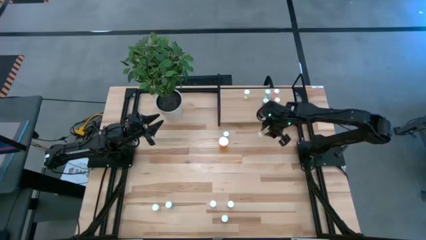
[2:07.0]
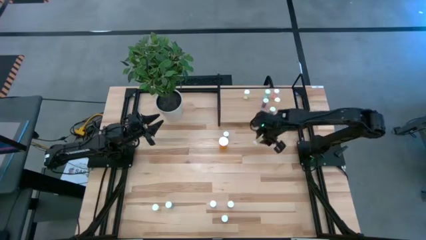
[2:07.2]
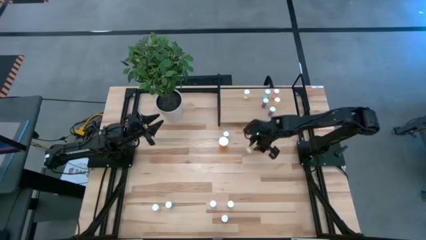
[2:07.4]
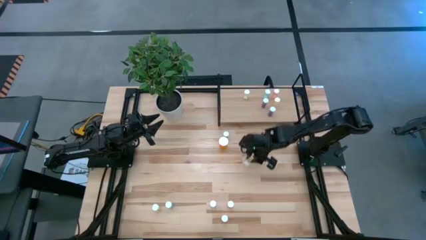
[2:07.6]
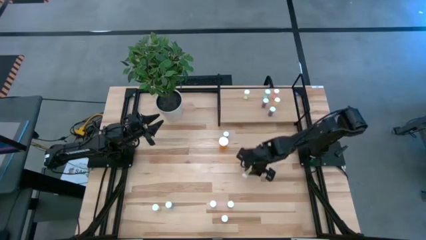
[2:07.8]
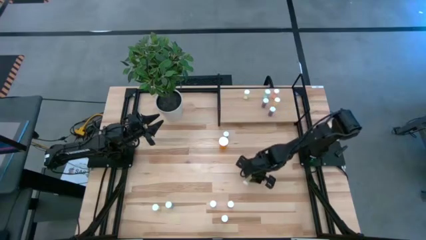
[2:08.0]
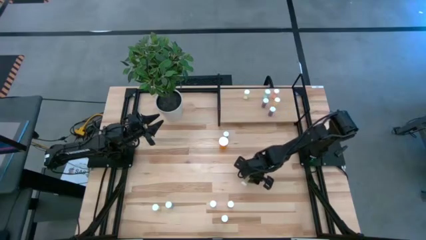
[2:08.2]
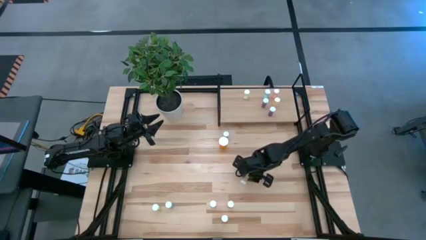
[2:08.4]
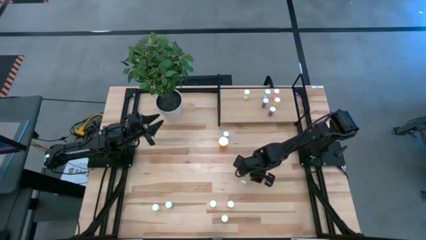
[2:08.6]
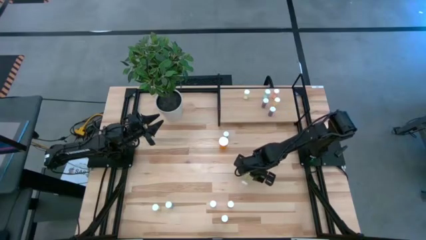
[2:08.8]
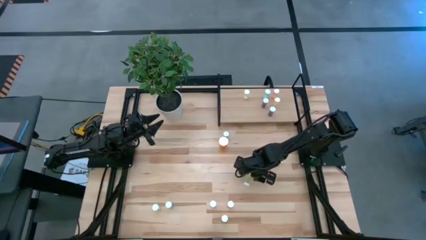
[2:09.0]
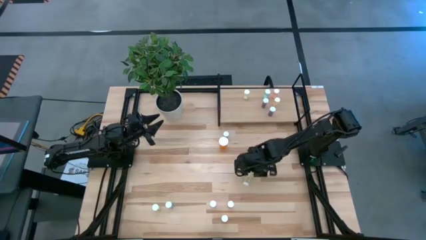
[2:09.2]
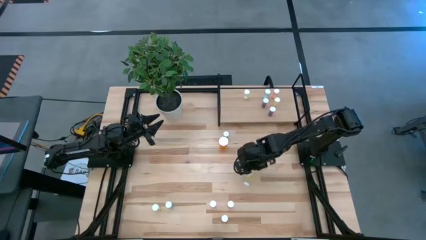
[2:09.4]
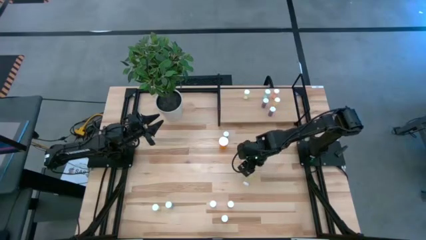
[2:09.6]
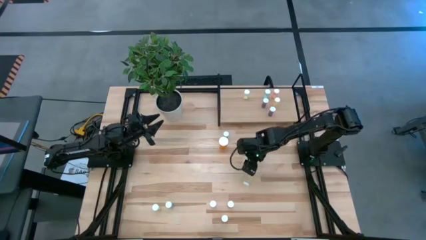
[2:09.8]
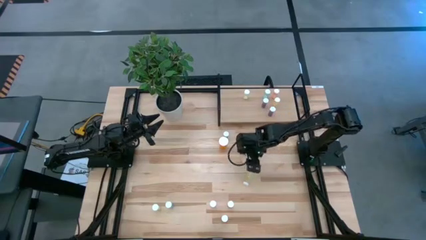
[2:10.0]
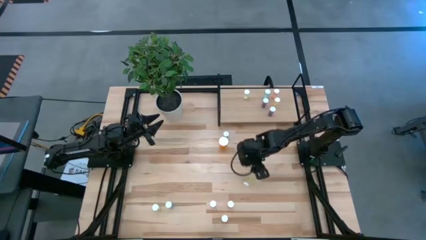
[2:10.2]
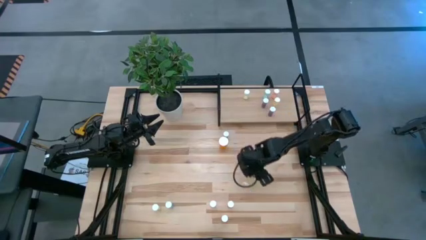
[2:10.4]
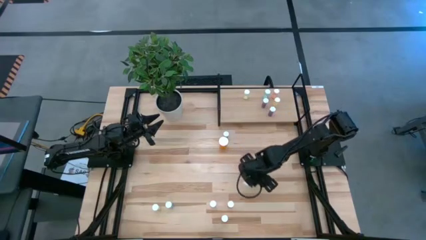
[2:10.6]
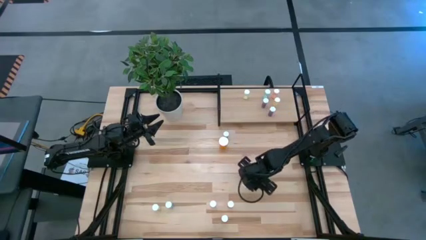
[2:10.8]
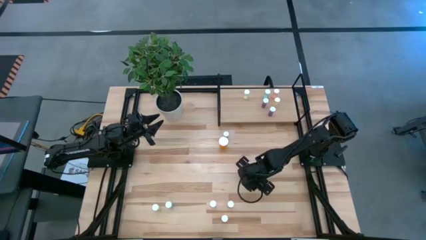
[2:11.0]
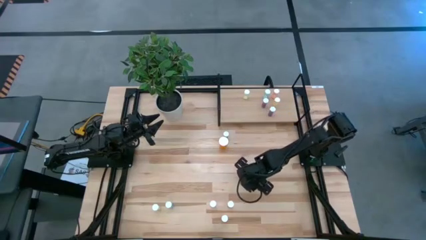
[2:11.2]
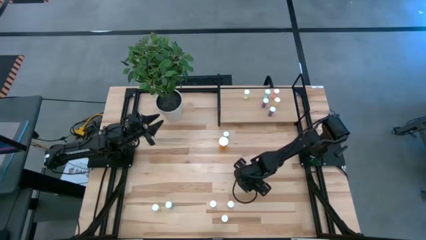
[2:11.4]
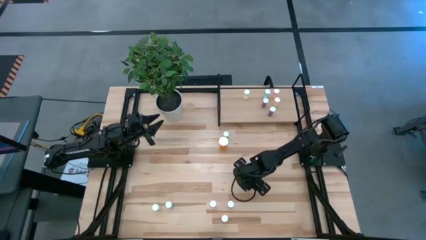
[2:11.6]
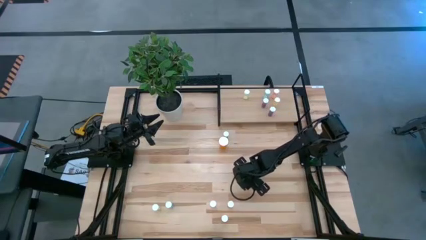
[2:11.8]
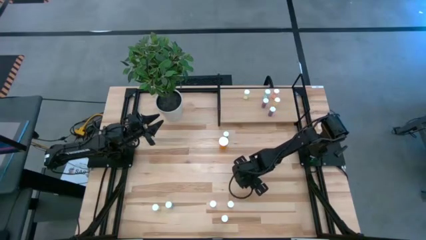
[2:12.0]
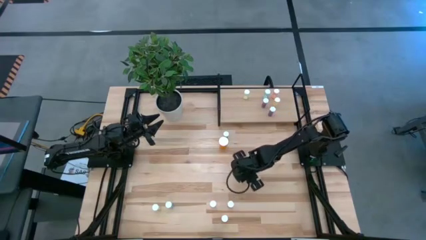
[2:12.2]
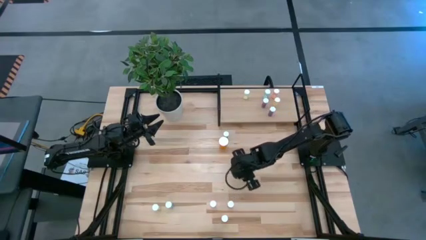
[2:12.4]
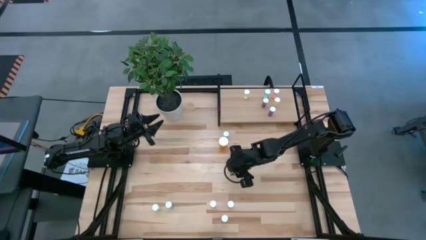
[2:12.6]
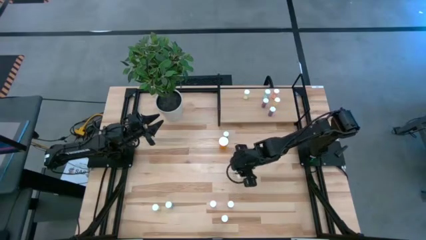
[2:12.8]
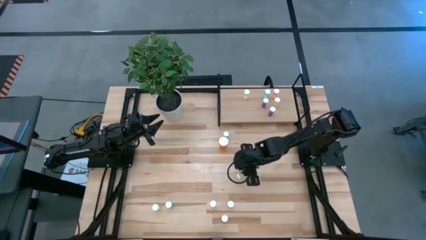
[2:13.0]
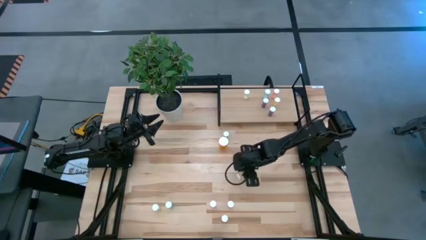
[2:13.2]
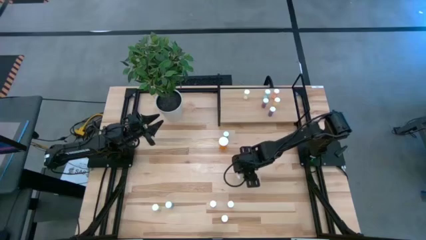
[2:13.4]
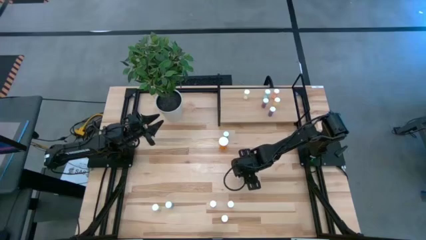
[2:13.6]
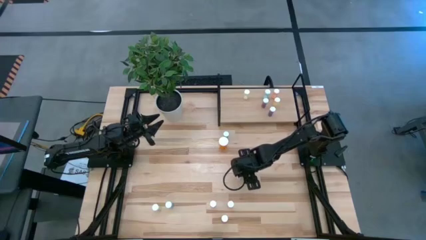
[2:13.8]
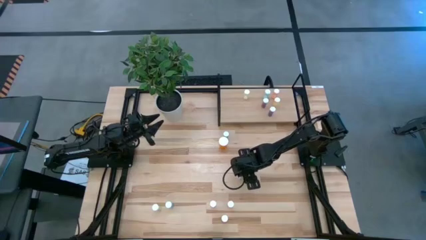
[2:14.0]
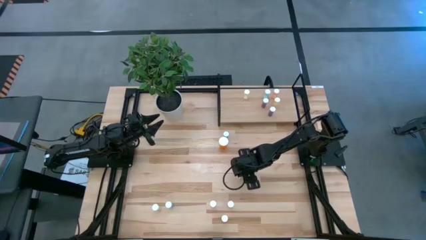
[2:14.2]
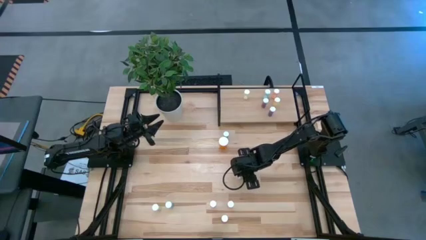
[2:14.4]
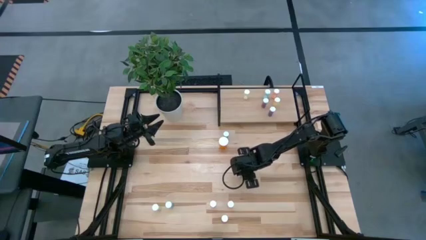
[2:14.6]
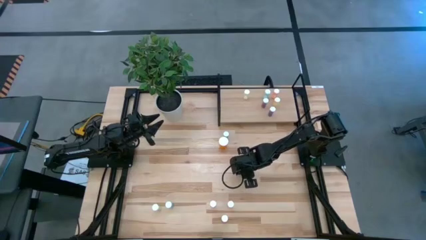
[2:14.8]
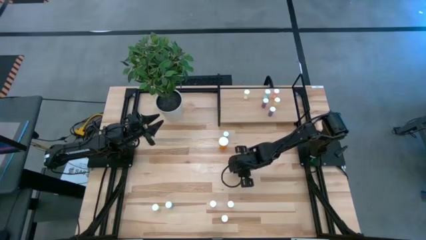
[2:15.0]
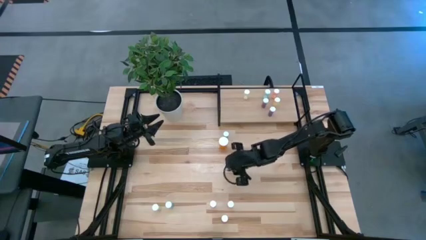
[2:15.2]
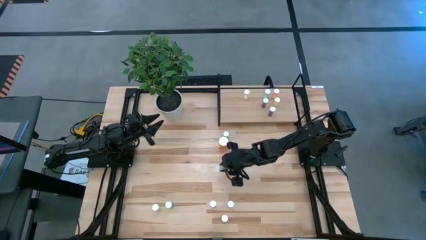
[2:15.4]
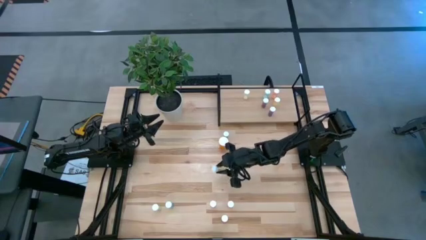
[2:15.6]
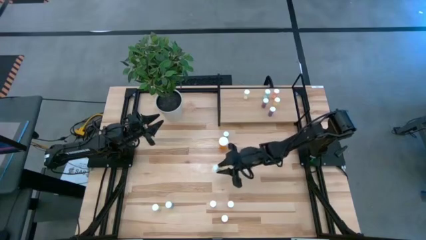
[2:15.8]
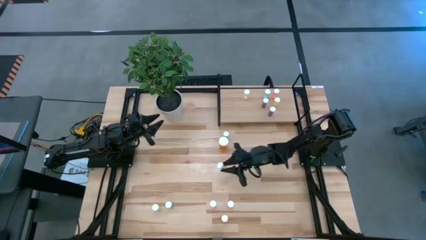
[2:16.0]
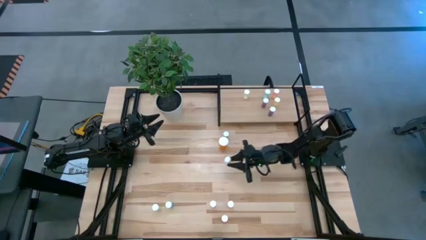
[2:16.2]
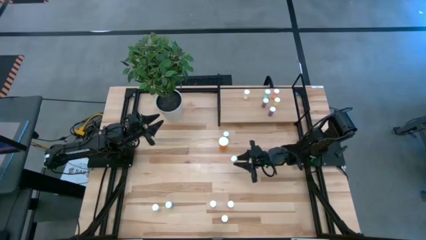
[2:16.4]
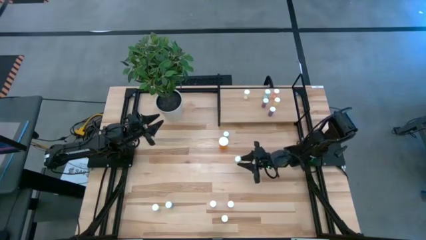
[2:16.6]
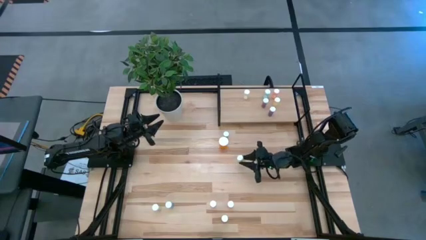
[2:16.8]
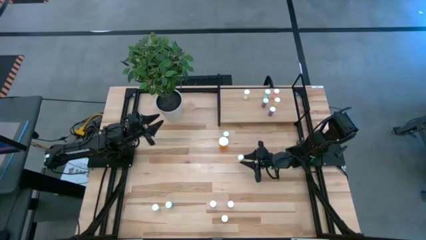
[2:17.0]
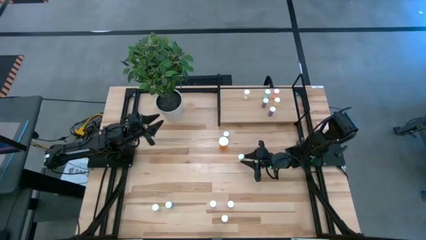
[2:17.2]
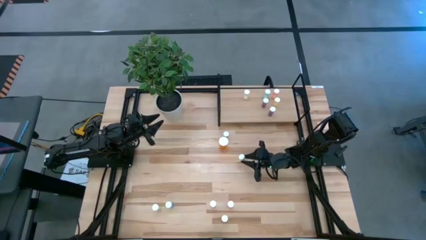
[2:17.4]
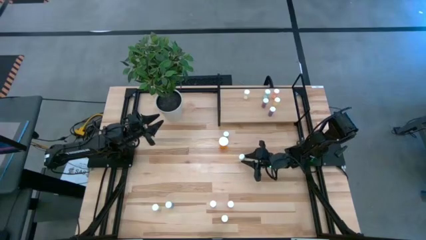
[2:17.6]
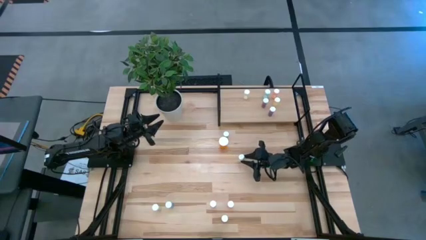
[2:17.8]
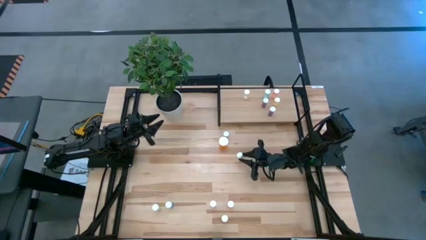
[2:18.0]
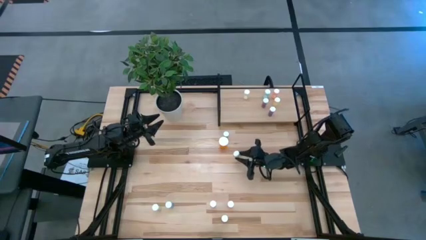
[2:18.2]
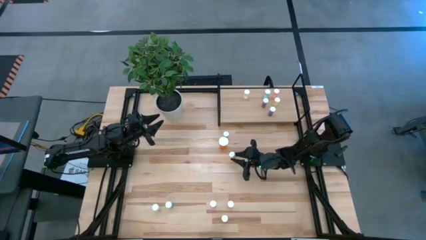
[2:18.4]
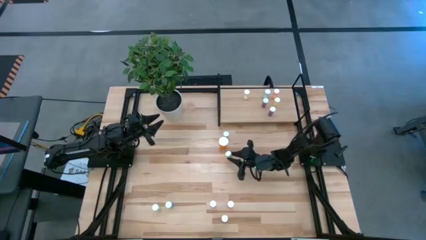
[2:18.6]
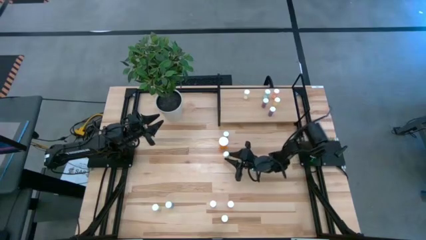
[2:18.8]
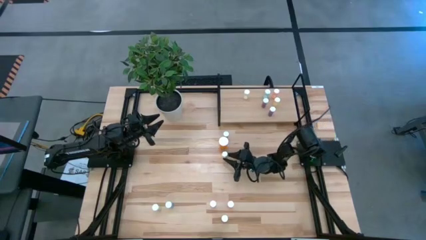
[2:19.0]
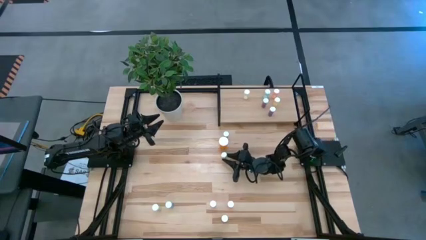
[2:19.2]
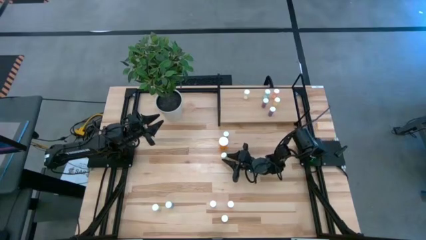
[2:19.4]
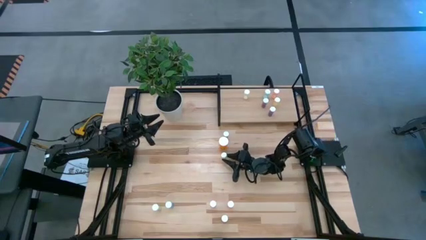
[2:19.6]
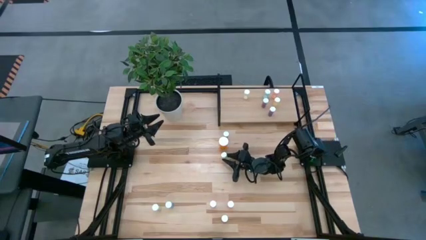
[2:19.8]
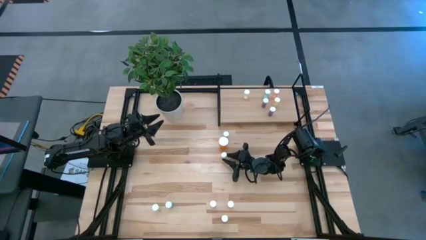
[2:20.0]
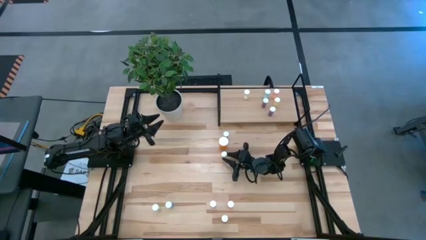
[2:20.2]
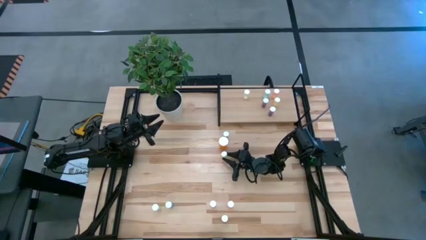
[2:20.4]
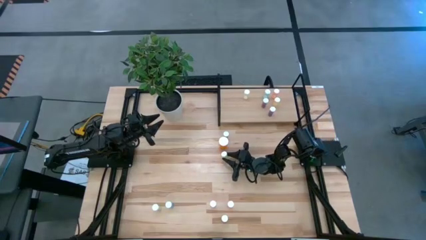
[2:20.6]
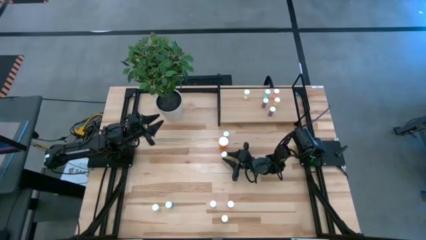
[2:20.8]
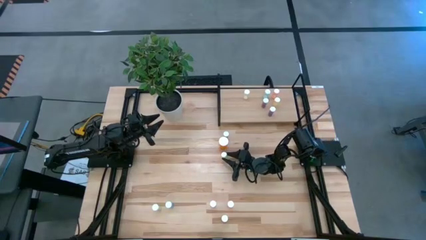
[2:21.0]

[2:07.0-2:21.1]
Task: Pick and place medicine bottles onto shelf by color
Put the right yellow pill bottle on the shelf

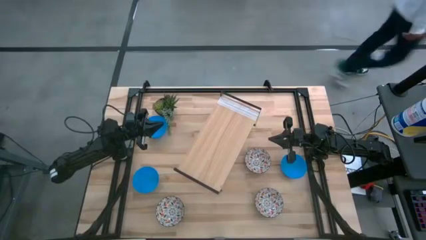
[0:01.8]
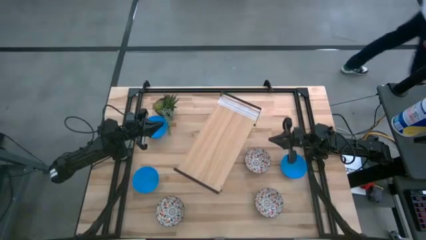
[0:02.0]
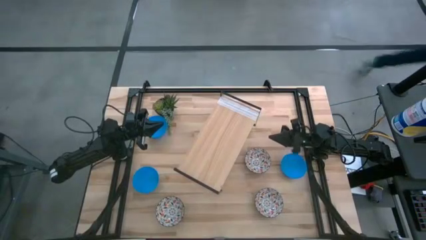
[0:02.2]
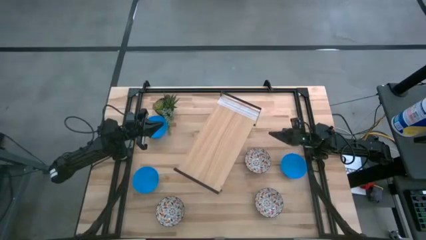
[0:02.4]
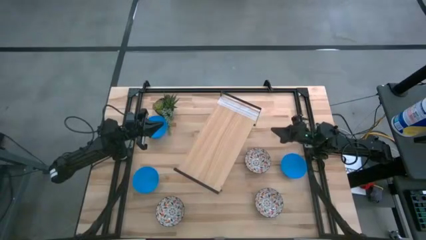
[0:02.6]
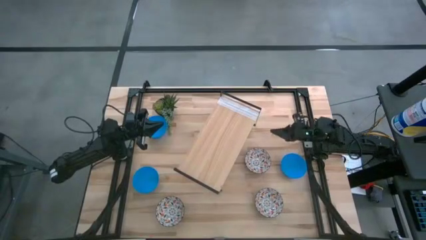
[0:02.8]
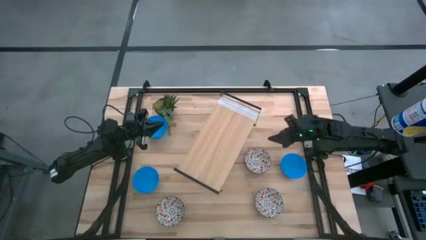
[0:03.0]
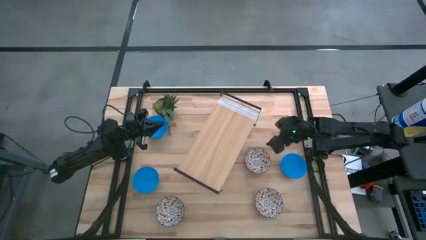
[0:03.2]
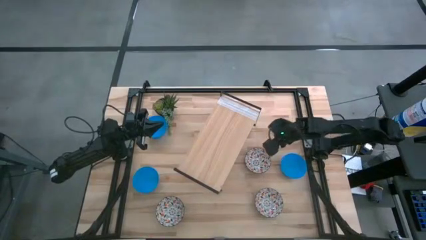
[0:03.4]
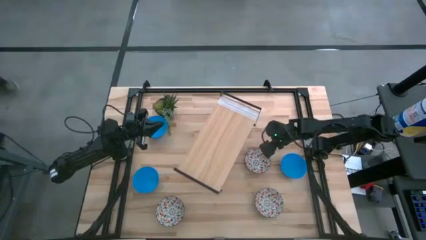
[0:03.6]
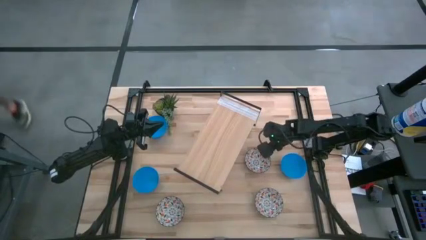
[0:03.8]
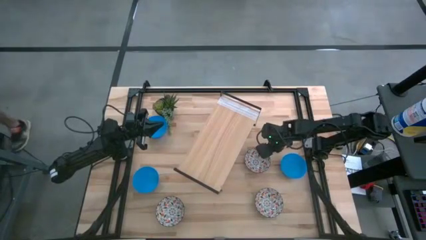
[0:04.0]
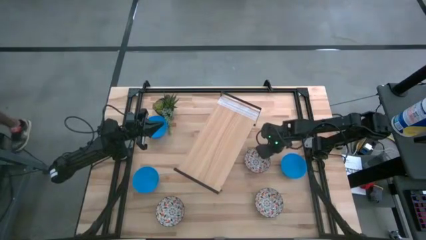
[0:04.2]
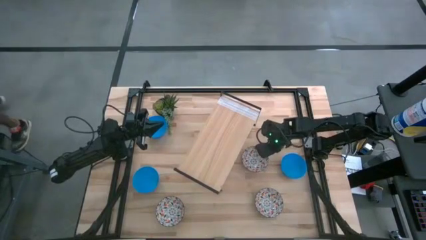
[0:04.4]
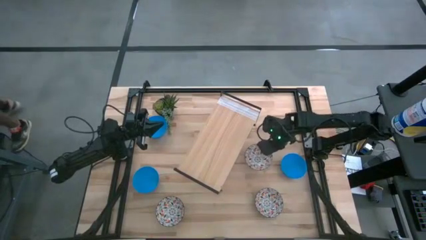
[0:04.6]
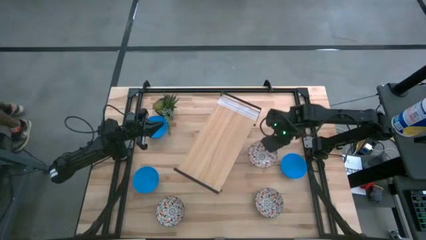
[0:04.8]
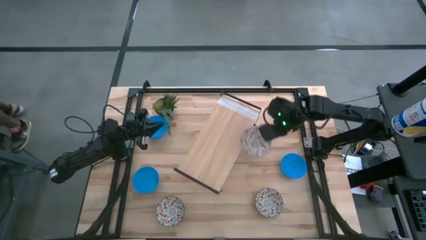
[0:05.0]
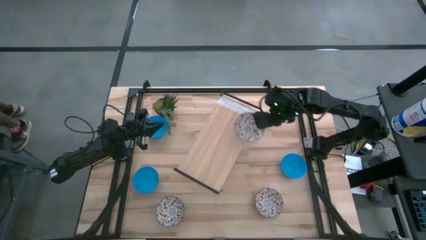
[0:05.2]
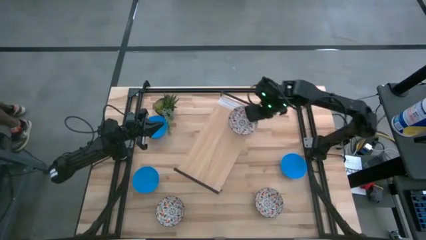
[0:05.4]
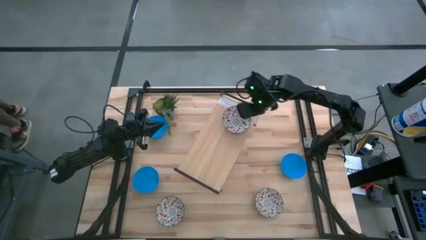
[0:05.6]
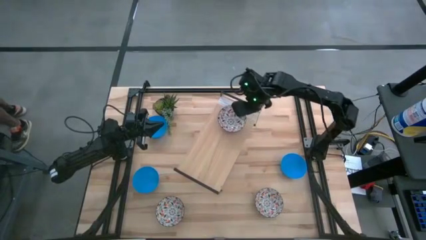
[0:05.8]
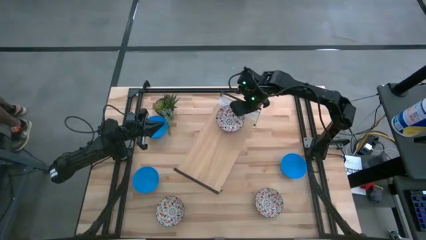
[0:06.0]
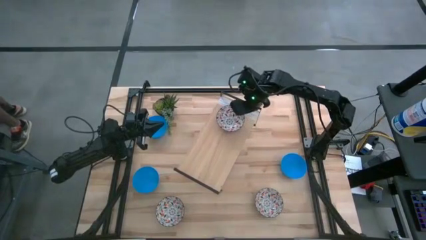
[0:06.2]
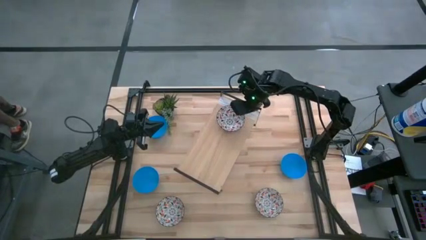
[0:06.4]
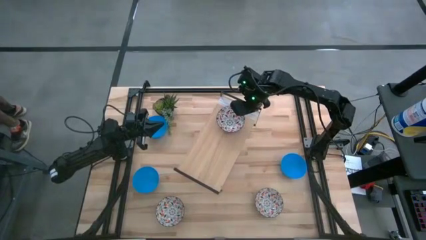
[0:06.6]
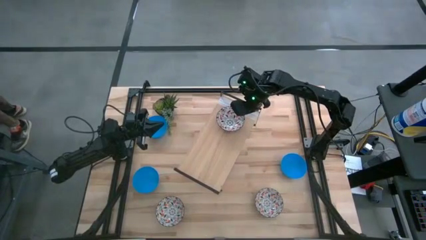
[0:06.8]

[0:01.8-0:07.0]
Task: Pick & Place Mini bowls
Put the top white patterned bowl on the shelf
